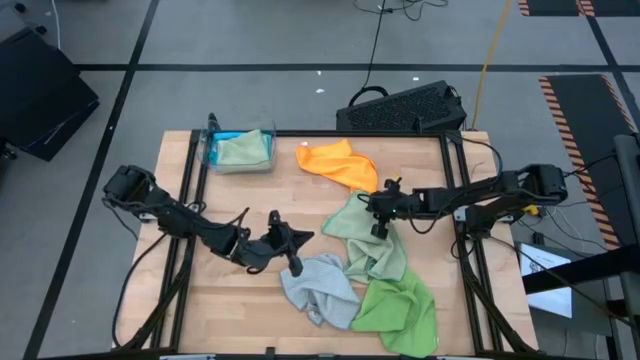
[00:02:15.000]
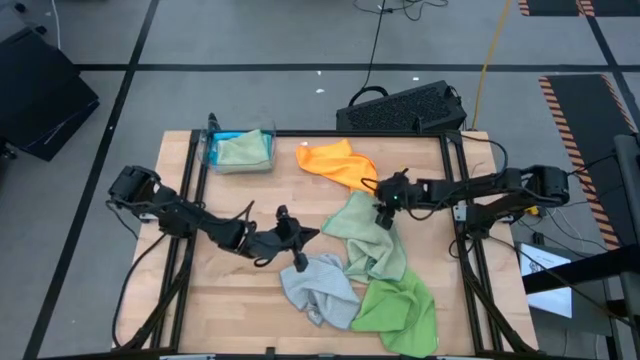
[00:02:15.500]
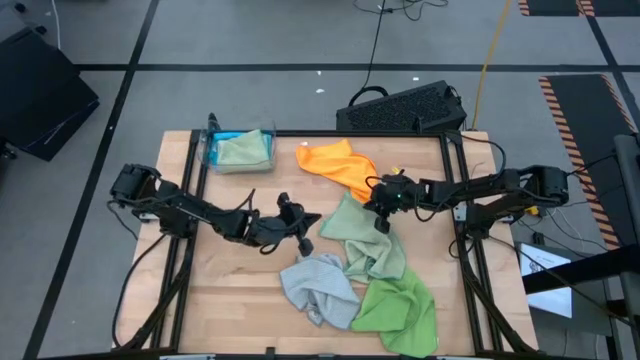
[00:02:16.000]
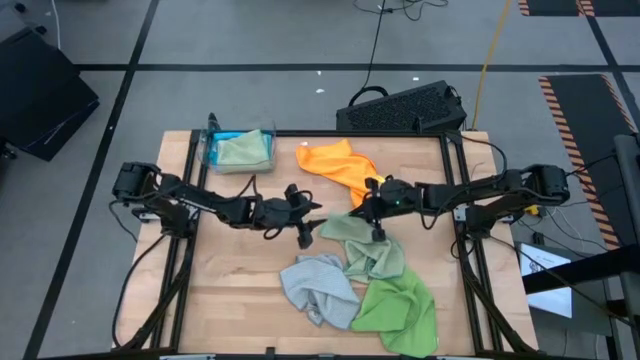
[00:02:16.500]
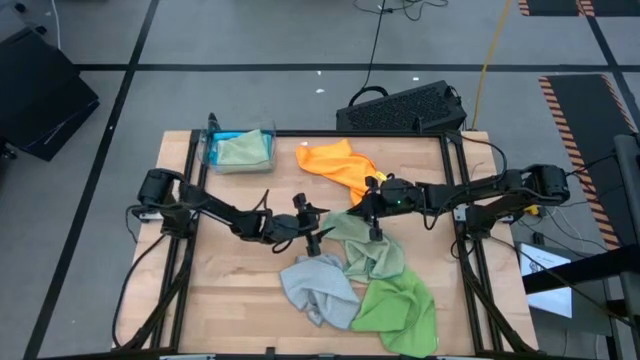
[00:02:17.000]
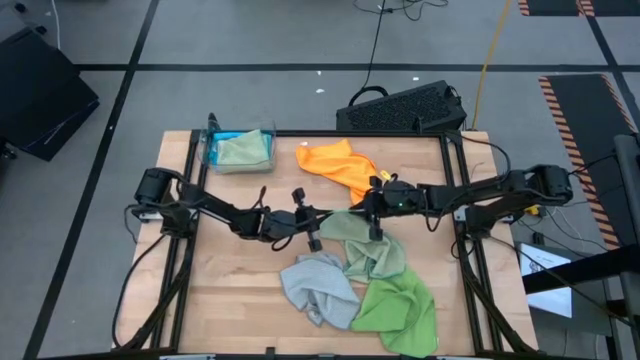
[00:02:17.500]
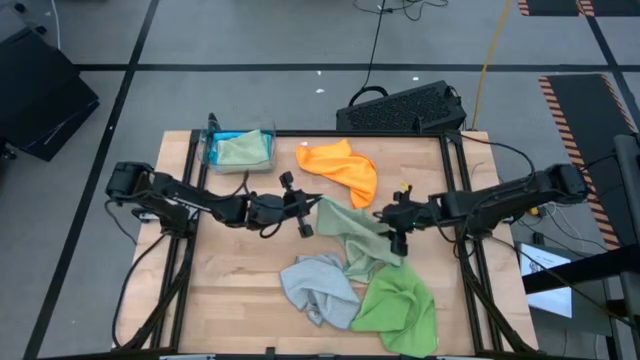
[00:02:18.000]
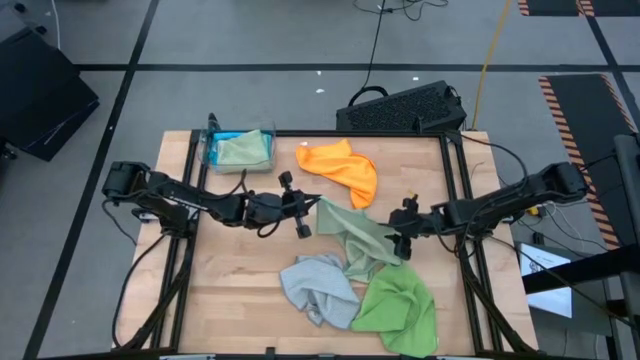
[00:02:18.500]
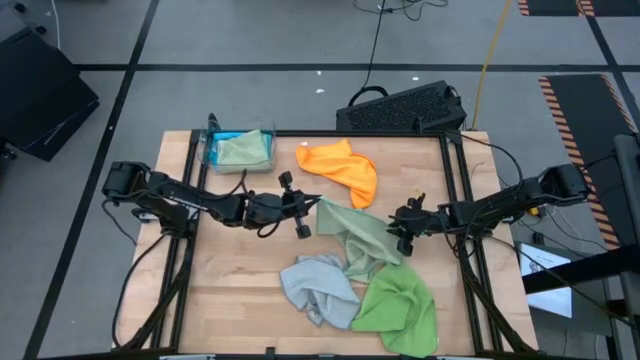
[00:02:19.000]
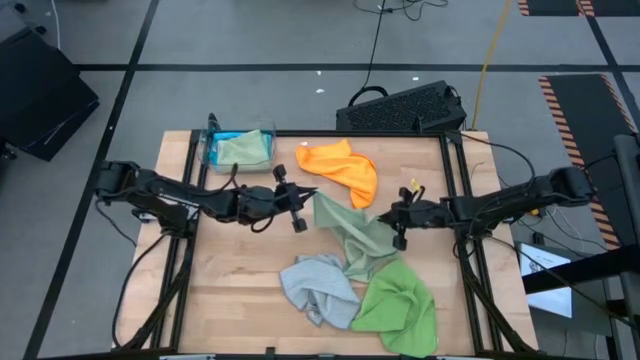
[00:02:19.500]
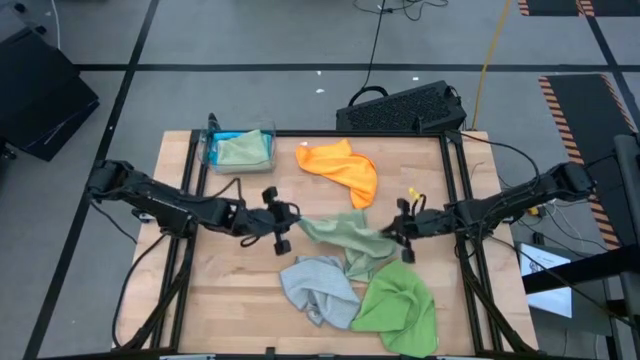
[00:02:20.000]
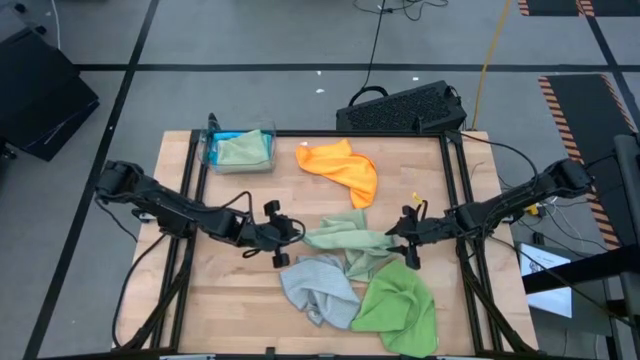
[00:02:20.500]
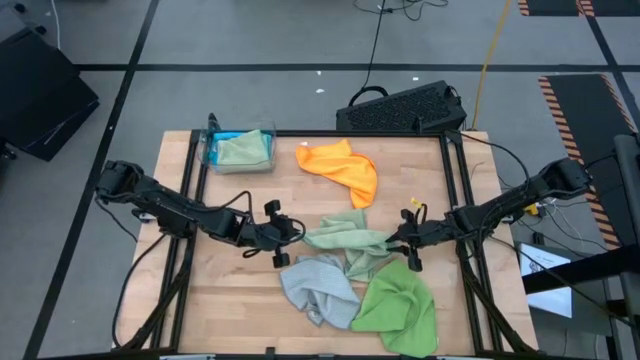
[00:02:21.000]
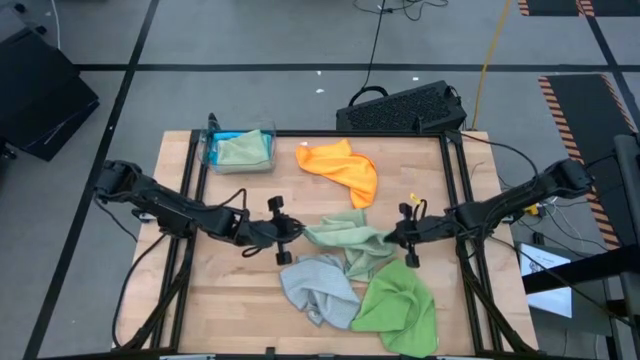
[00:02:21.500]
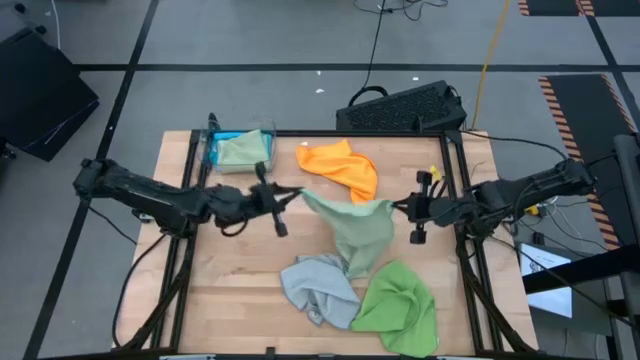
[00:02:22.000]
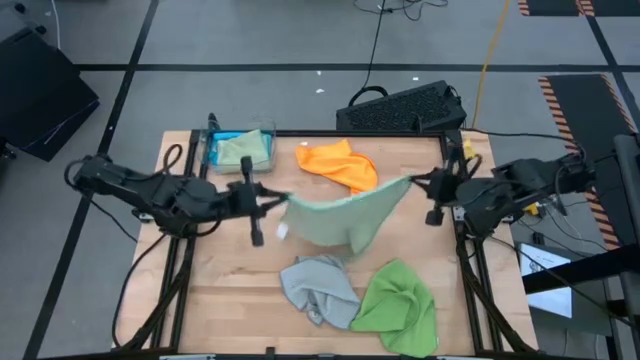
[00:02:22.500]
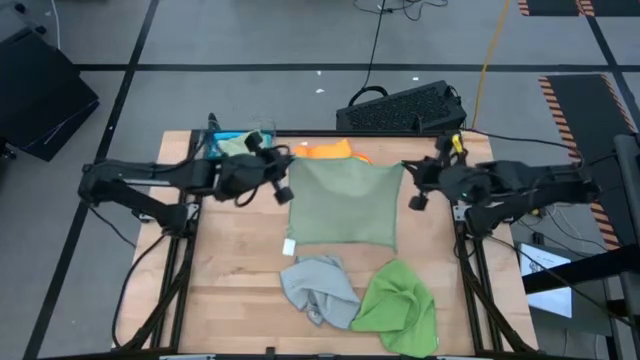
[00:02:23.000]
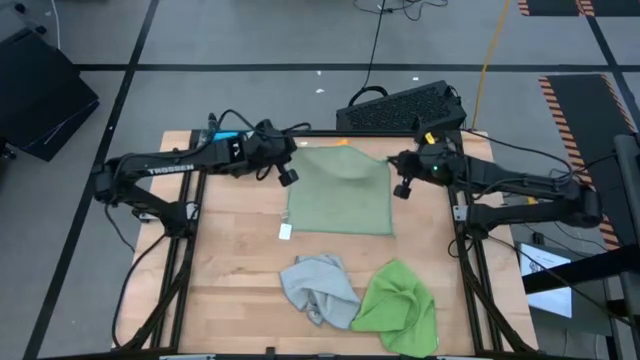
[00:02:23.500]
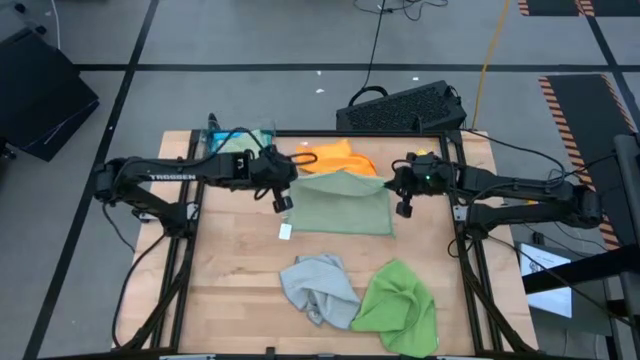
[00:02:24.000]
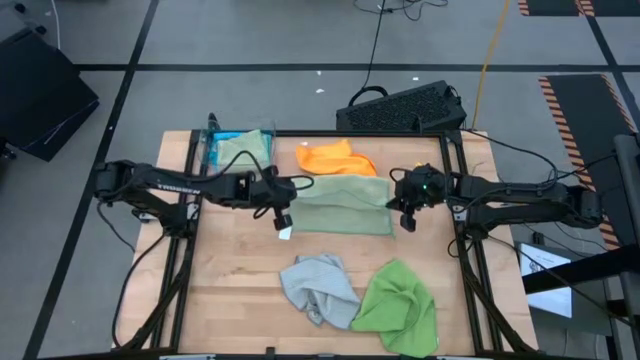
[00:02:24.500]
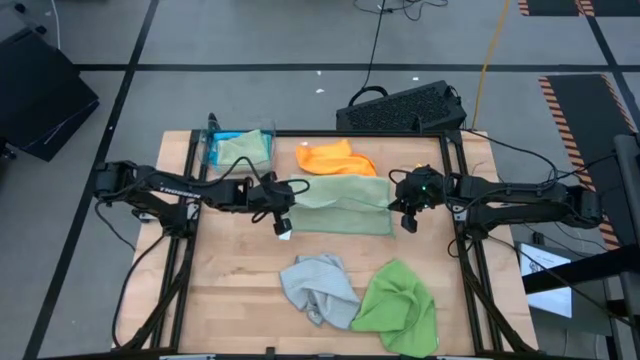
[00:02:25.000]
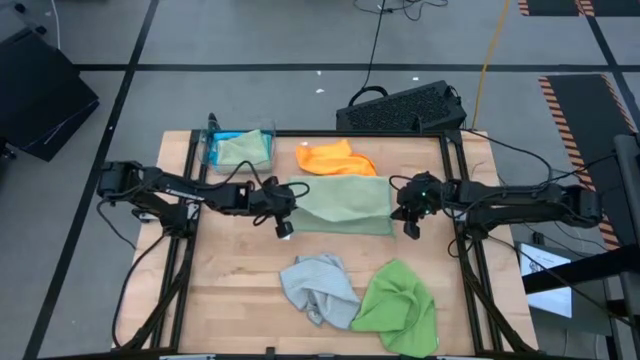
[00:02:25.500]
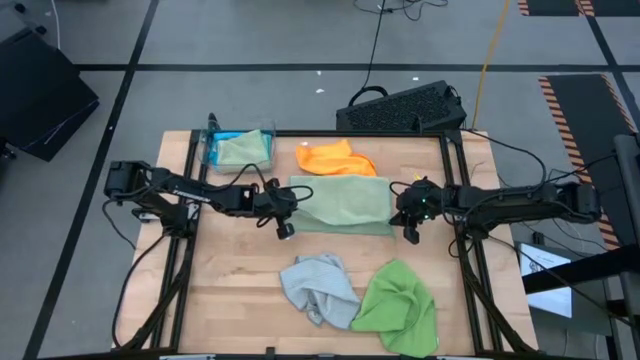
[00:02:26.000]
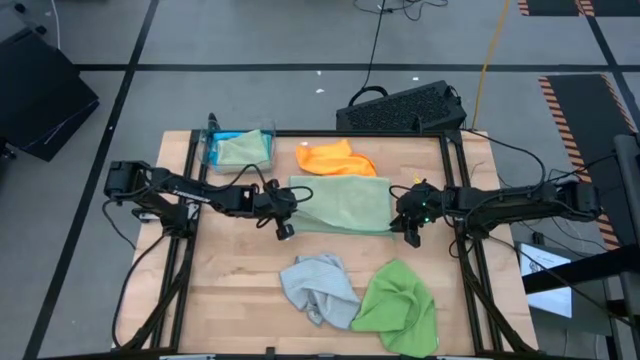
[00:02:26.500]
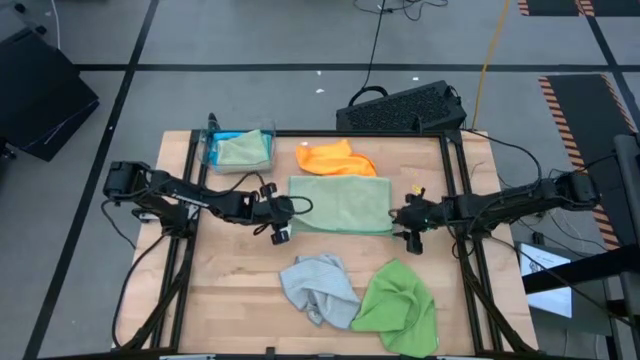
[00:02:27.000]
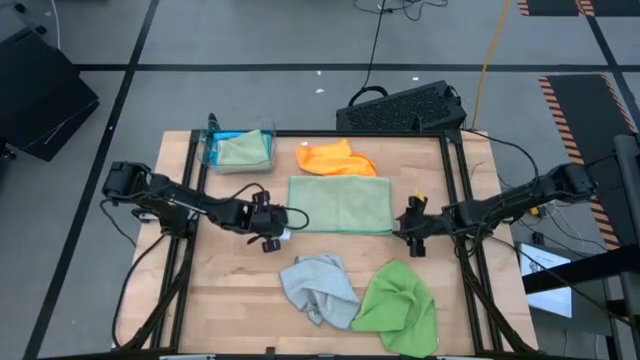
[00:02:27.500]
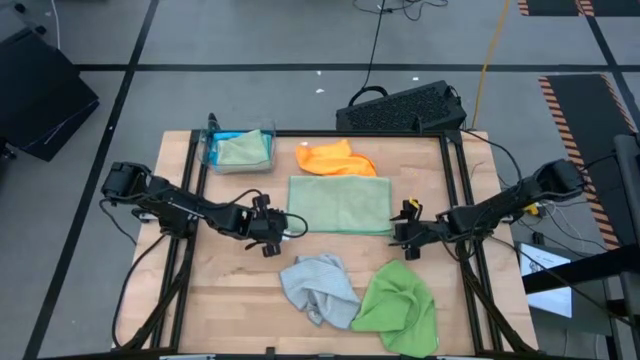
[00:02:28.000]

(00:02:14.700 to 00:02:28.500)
Task: Fold microfiber towels
Fold the light green microfiber cloth

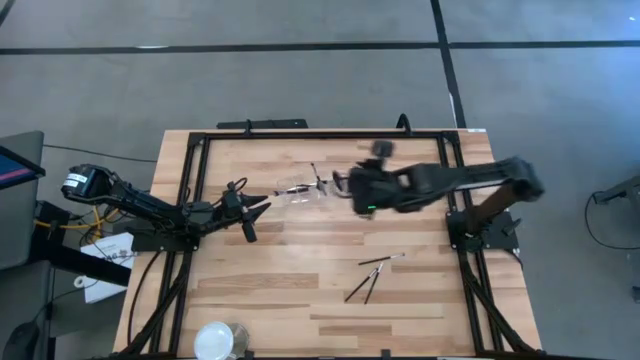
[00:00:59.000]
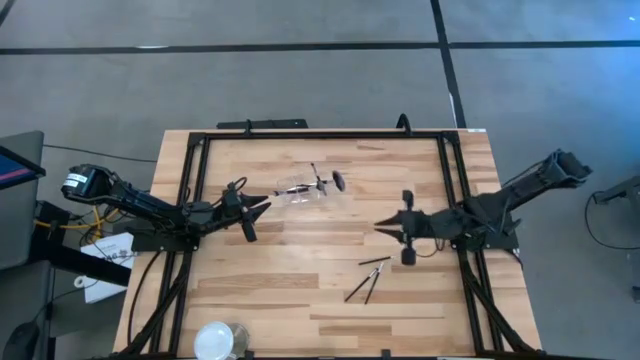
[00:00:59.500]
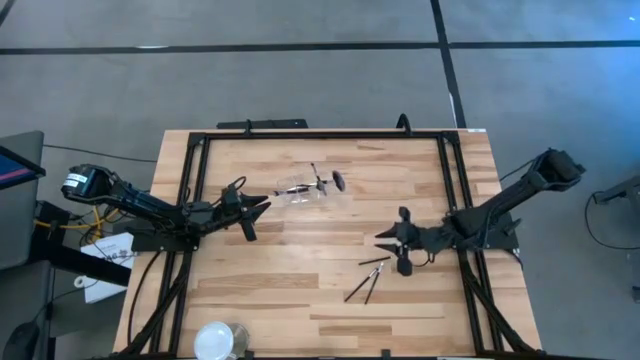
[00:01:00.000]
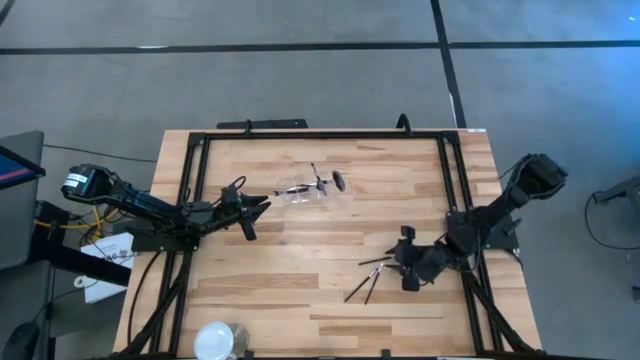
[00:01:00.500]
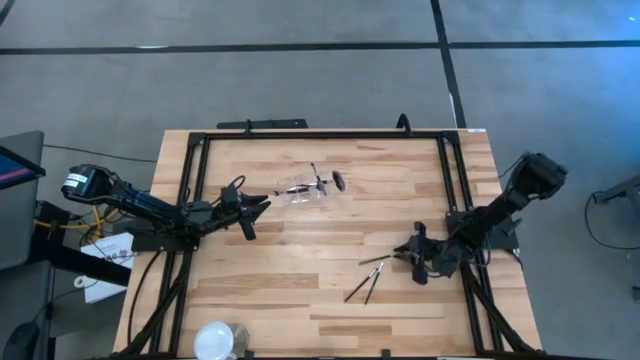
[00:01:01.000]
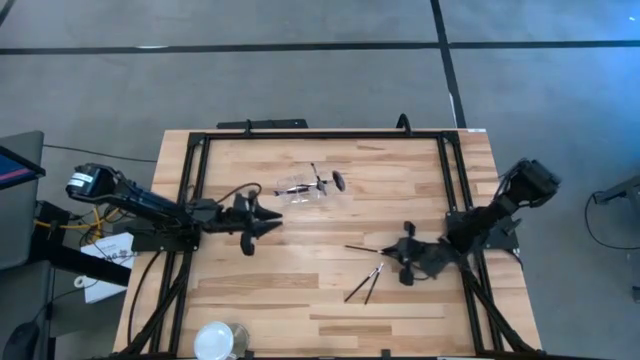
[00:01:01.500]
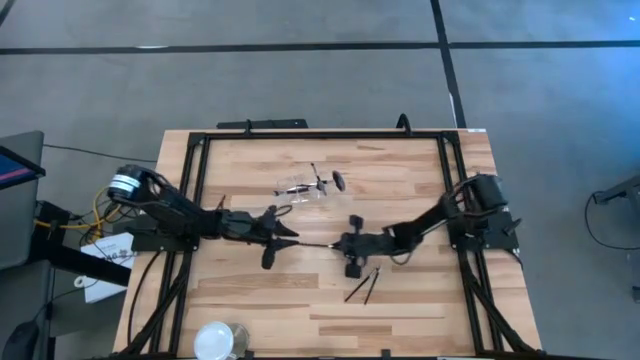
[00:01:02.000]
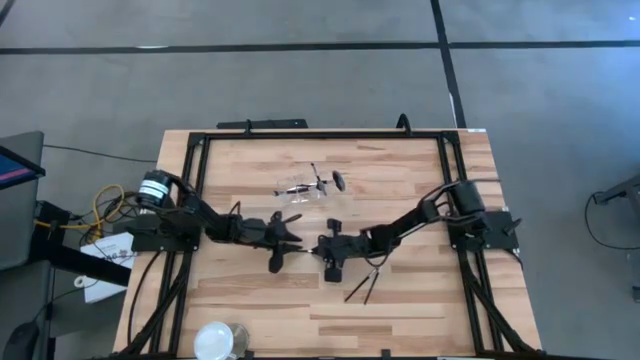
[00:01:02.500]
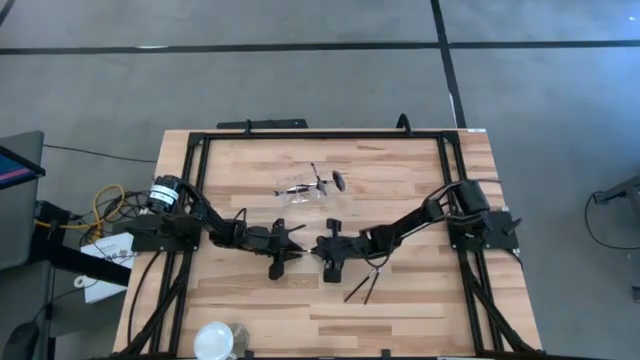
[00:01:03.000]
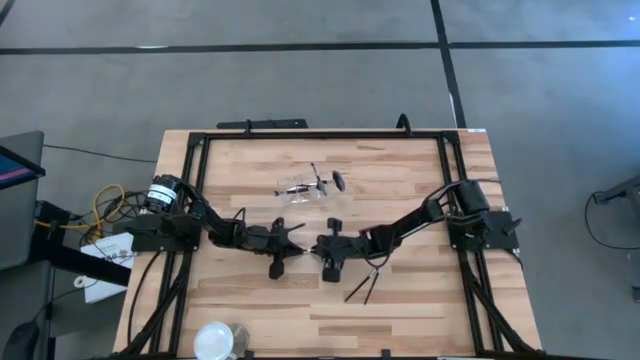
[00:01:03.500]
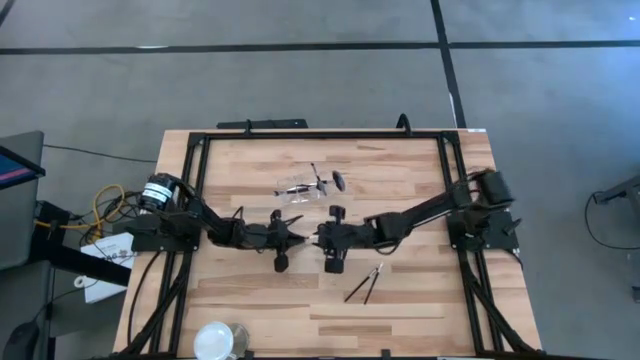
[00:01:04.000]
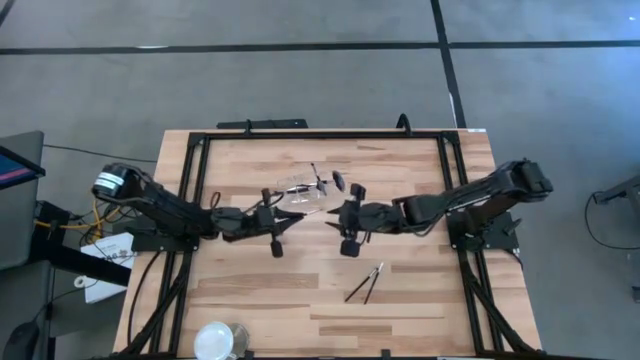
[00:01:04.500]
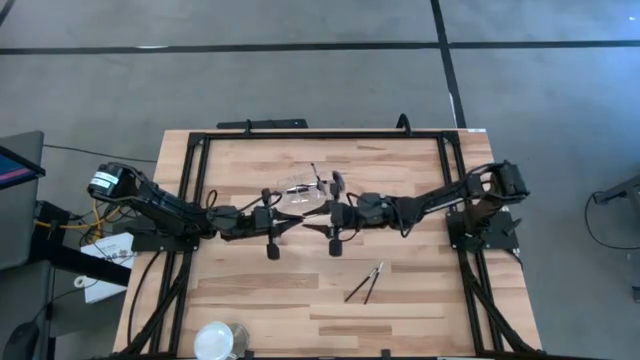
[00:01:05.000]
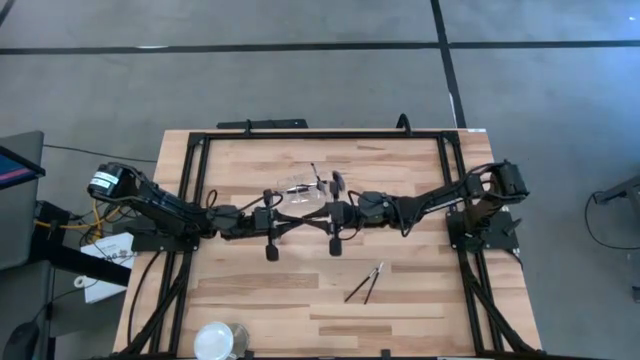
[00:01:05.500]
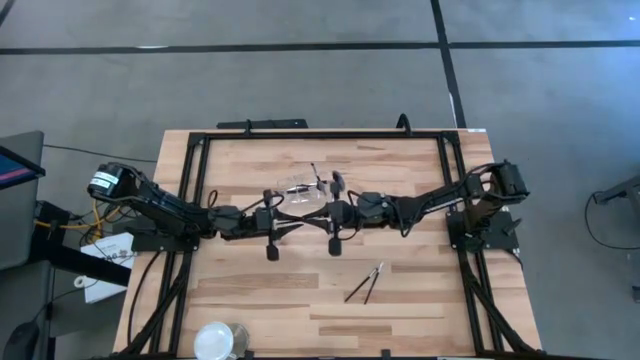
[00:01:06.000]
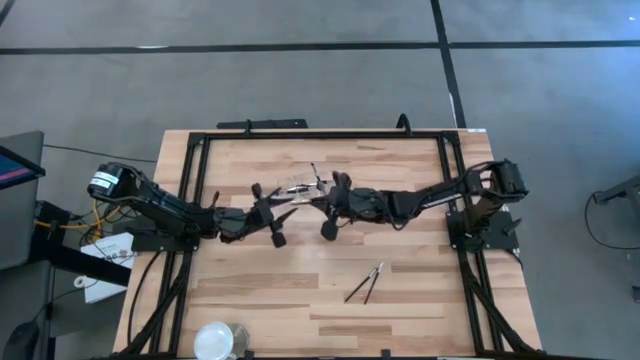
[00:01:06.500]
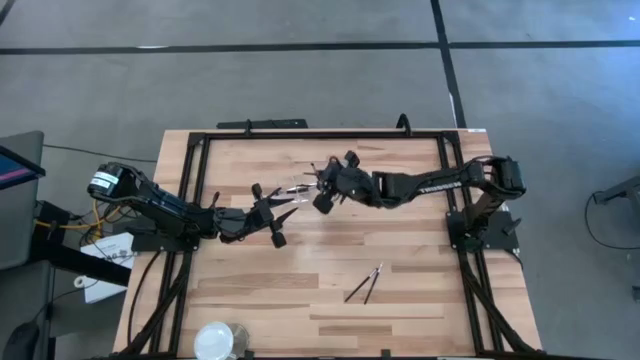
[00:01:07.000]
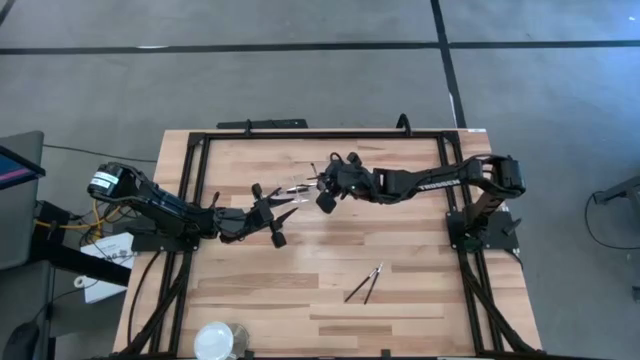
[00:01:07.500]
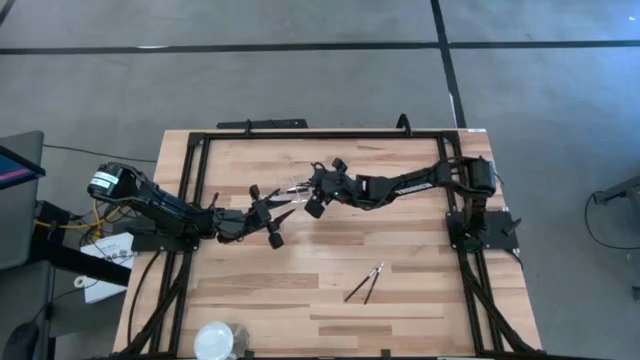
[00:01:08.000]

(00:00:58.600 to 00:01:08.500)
Task: Put items in baskets/containers
Put the black eyeshadow brush into the transparent organizer
